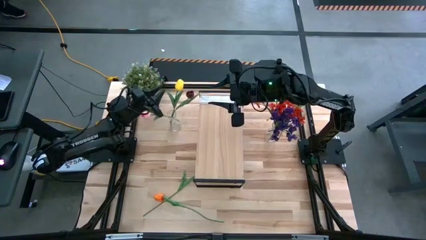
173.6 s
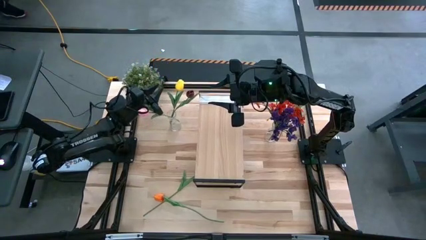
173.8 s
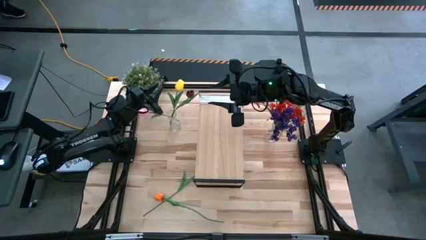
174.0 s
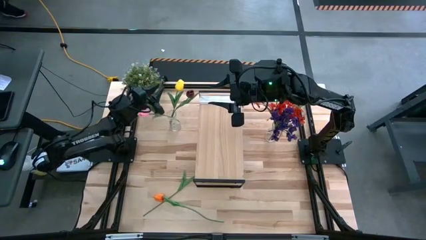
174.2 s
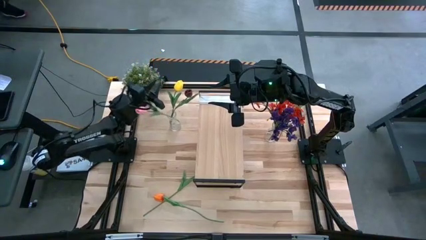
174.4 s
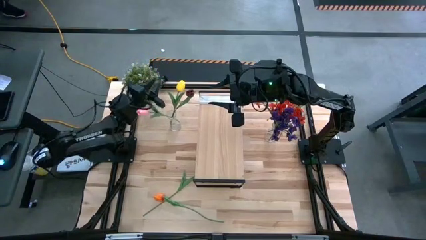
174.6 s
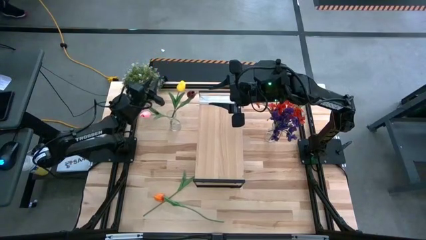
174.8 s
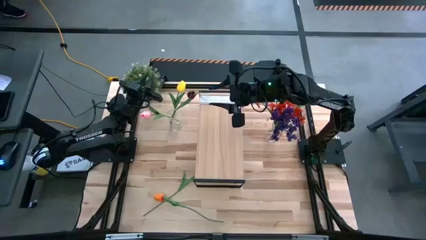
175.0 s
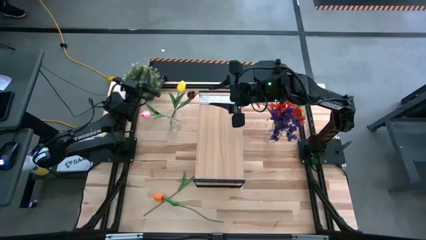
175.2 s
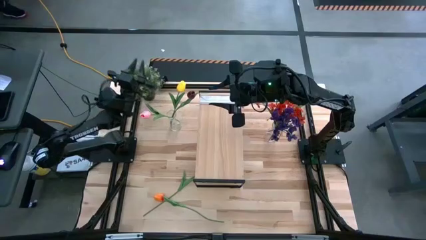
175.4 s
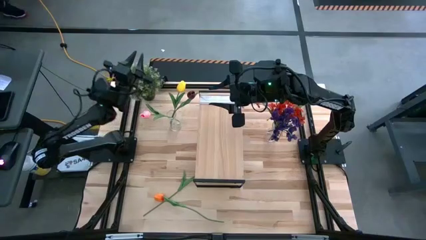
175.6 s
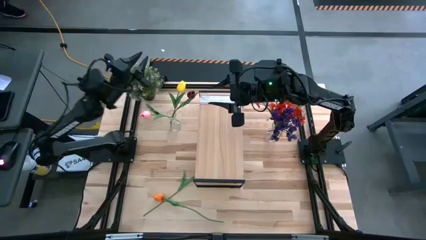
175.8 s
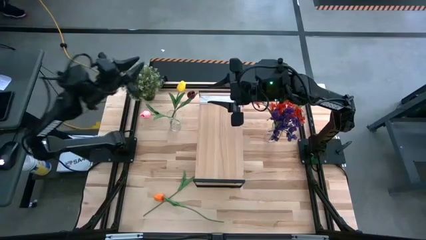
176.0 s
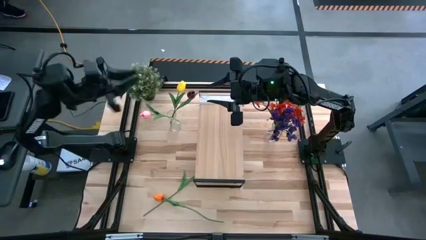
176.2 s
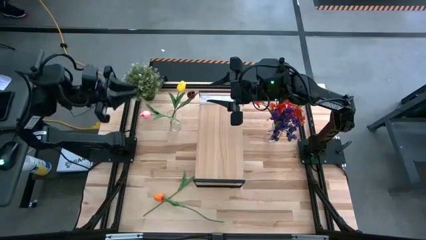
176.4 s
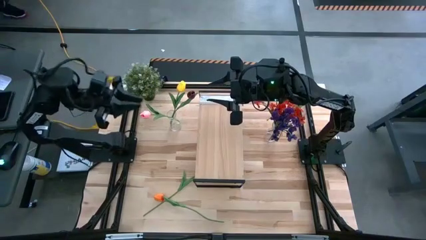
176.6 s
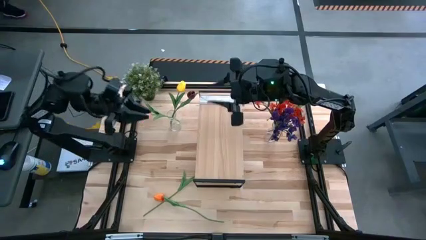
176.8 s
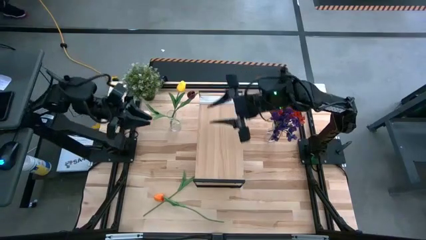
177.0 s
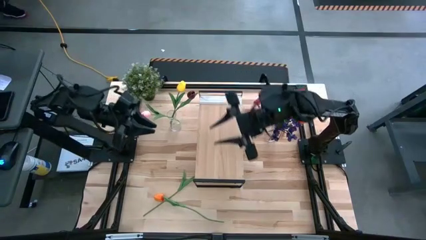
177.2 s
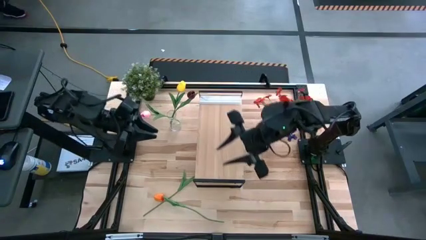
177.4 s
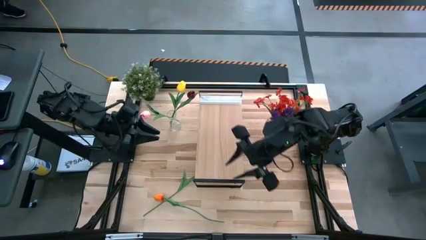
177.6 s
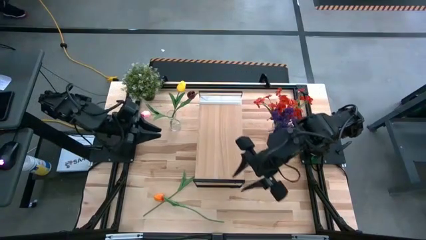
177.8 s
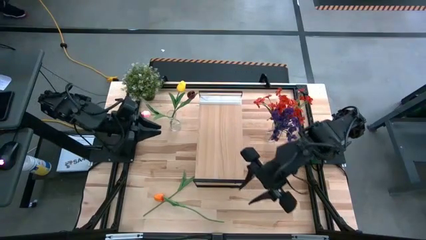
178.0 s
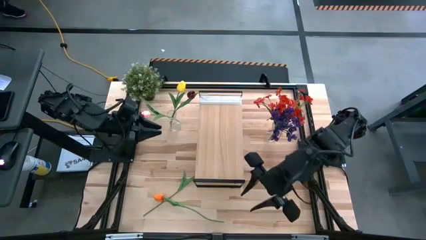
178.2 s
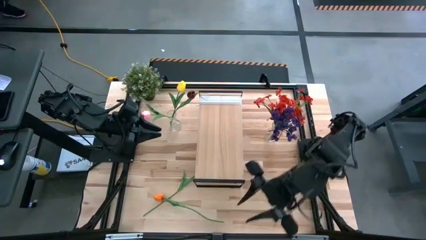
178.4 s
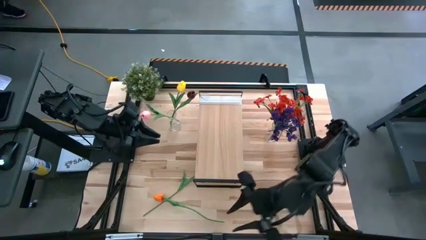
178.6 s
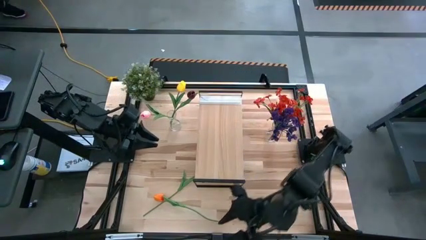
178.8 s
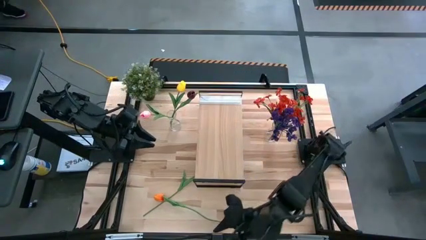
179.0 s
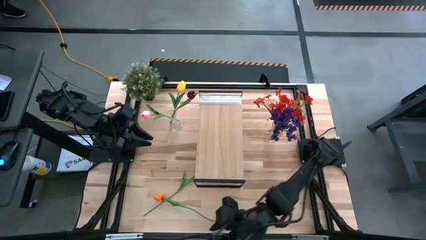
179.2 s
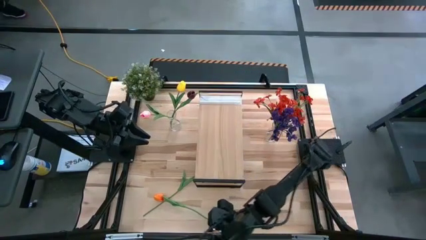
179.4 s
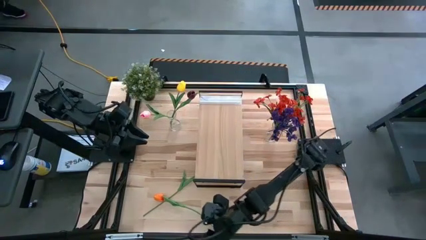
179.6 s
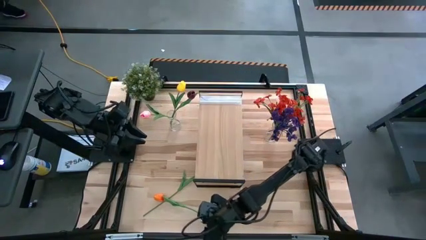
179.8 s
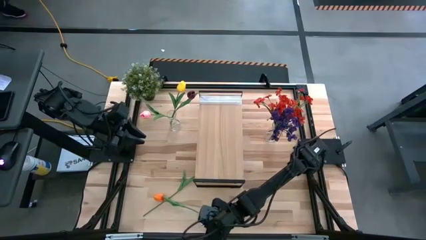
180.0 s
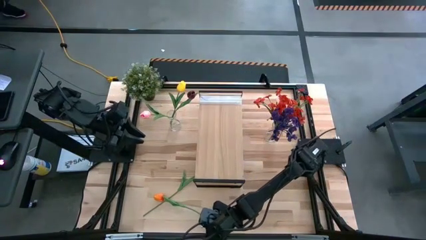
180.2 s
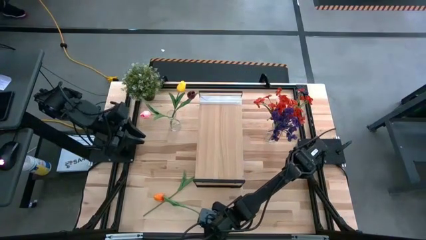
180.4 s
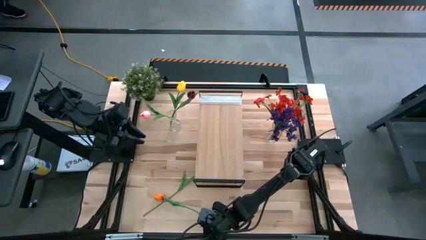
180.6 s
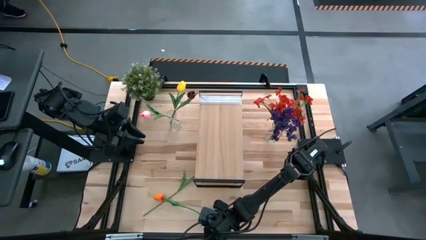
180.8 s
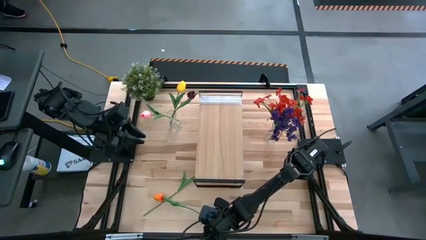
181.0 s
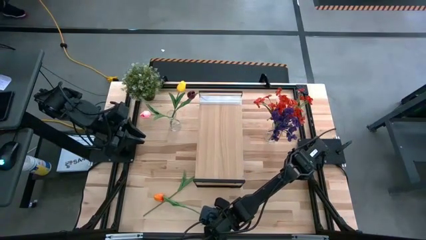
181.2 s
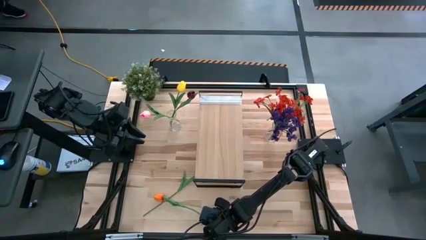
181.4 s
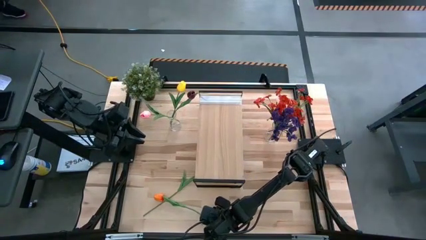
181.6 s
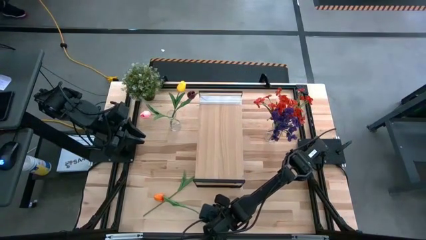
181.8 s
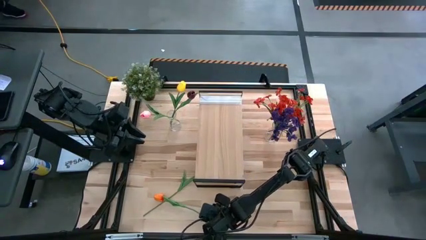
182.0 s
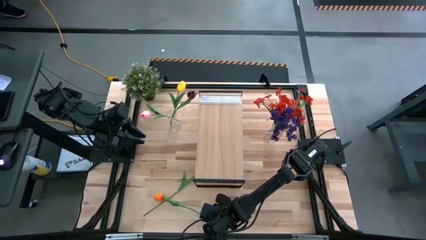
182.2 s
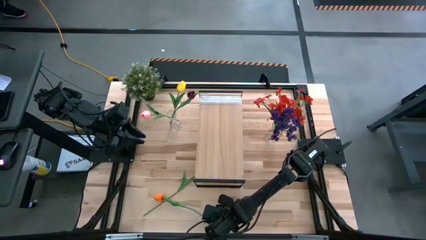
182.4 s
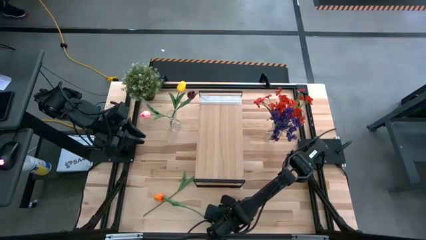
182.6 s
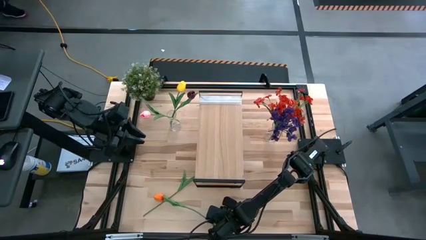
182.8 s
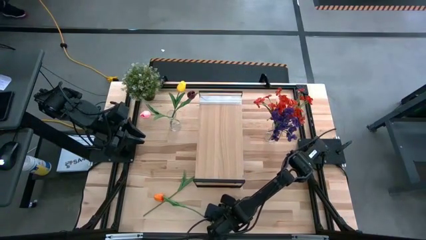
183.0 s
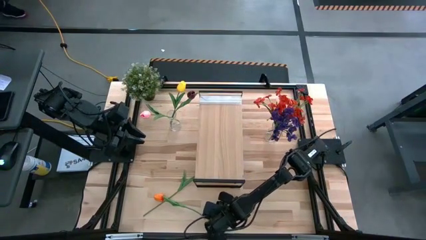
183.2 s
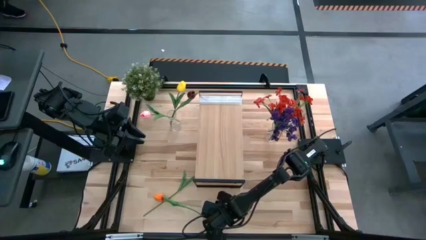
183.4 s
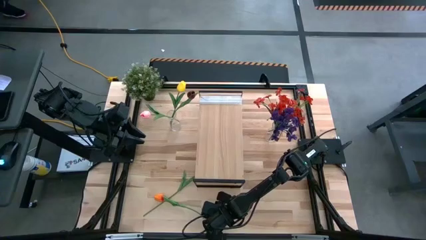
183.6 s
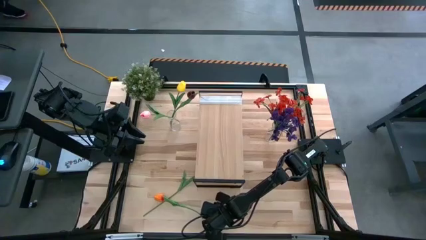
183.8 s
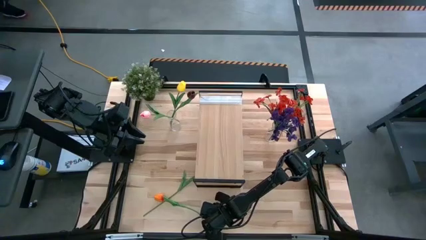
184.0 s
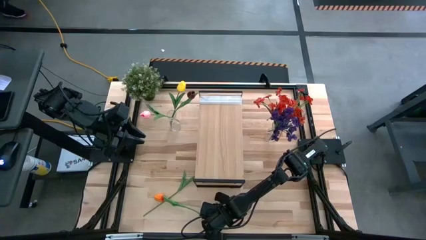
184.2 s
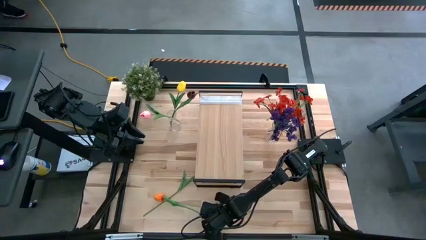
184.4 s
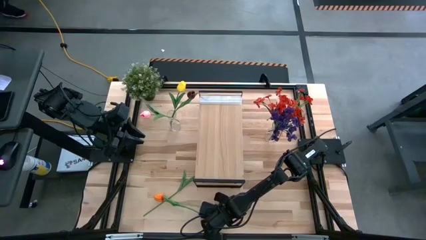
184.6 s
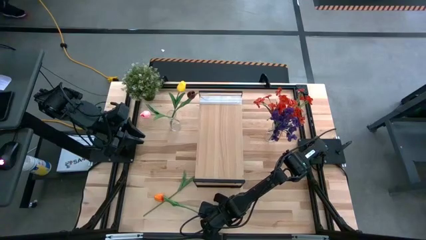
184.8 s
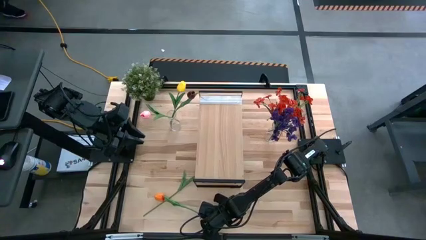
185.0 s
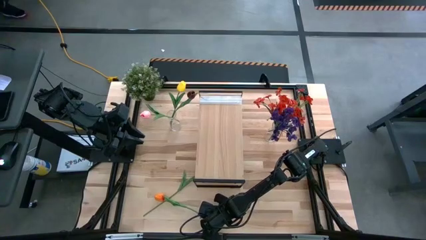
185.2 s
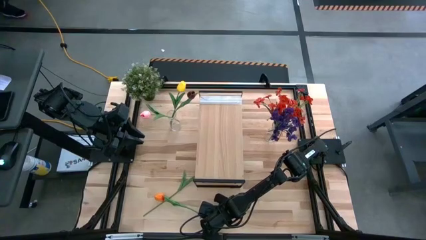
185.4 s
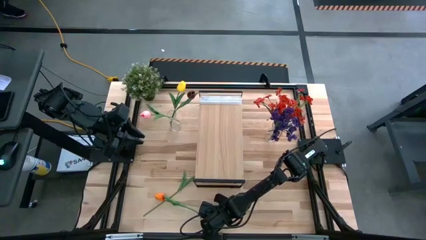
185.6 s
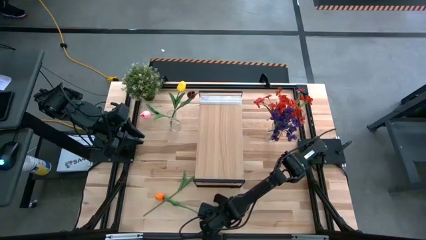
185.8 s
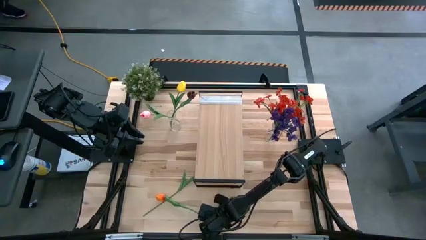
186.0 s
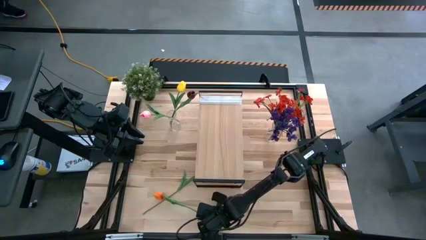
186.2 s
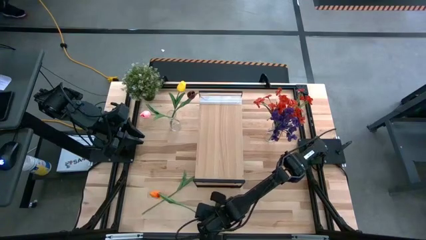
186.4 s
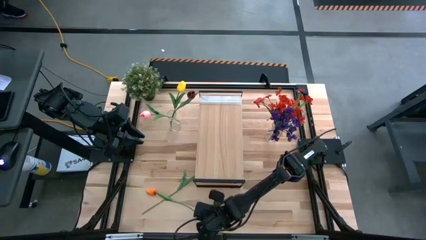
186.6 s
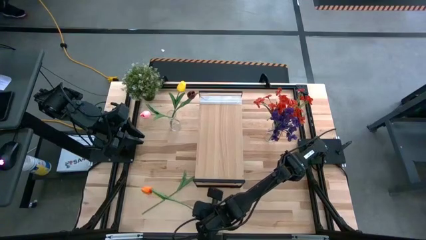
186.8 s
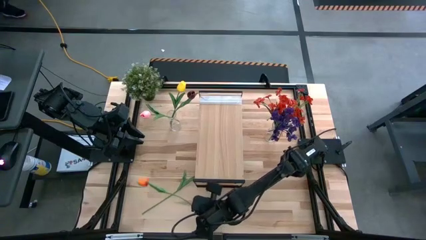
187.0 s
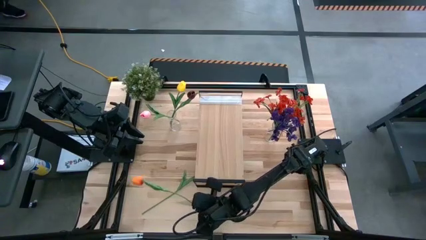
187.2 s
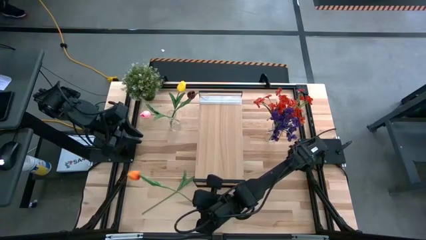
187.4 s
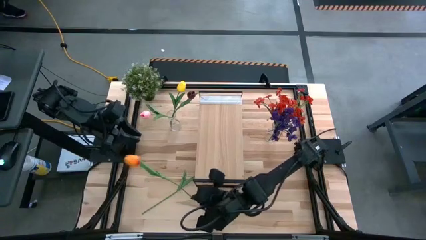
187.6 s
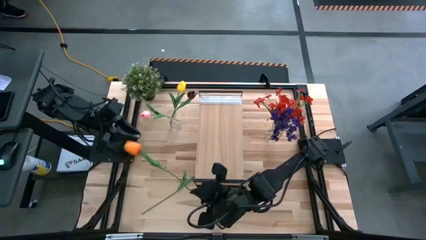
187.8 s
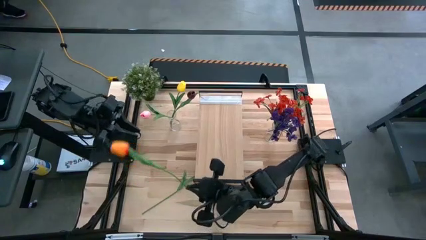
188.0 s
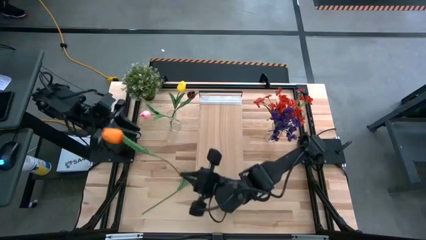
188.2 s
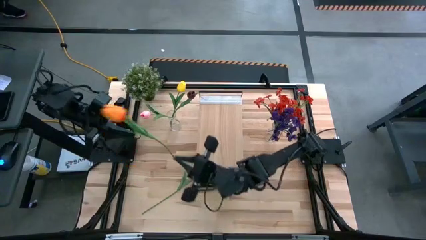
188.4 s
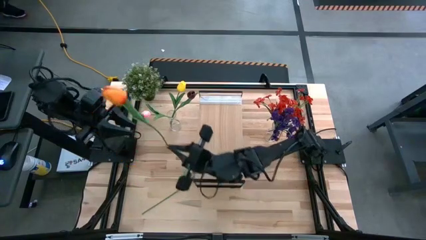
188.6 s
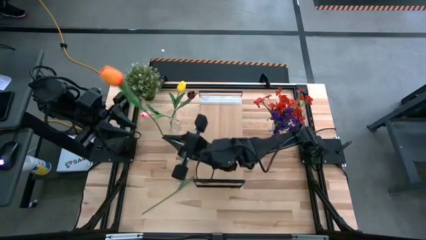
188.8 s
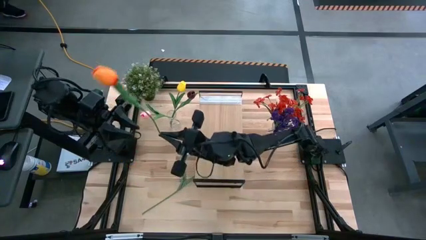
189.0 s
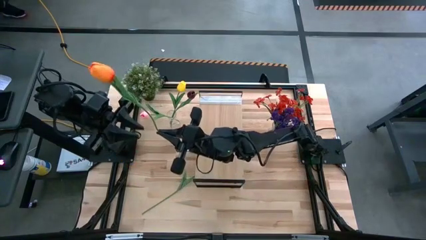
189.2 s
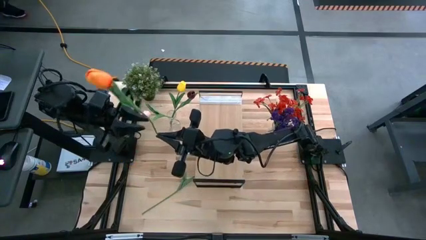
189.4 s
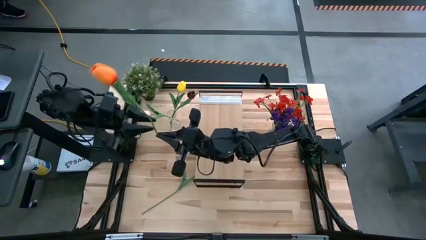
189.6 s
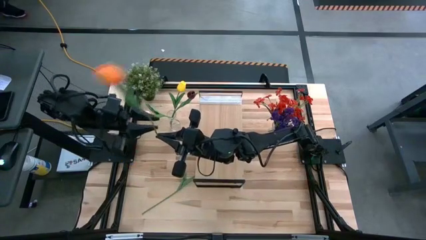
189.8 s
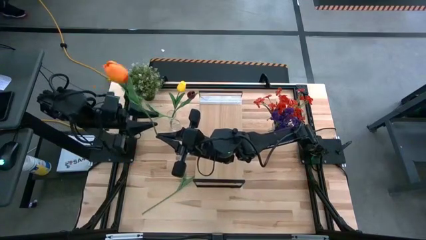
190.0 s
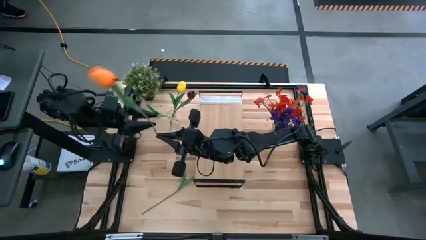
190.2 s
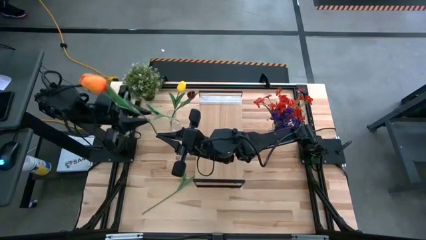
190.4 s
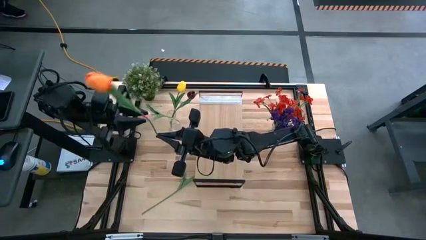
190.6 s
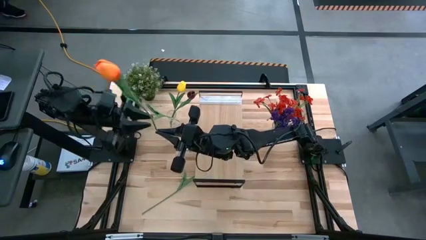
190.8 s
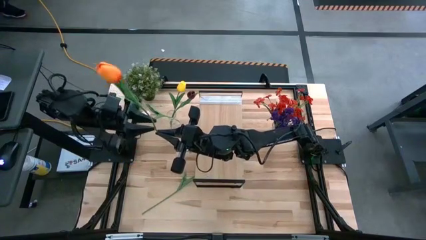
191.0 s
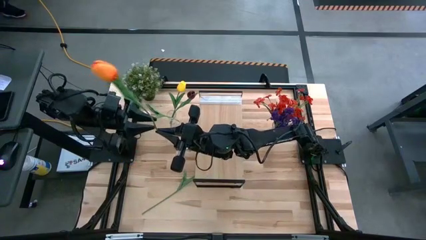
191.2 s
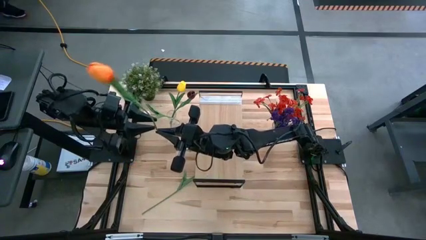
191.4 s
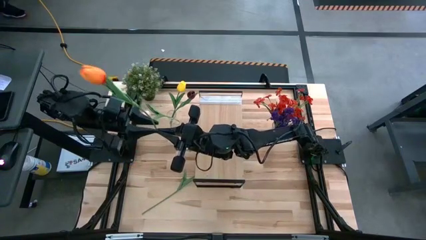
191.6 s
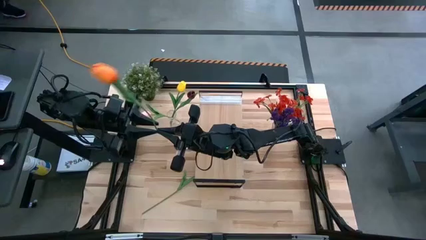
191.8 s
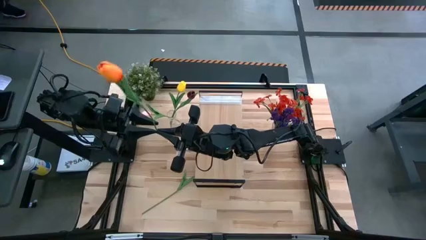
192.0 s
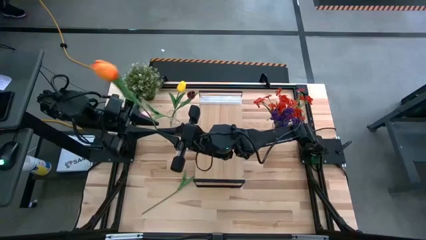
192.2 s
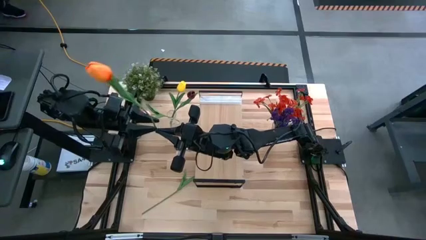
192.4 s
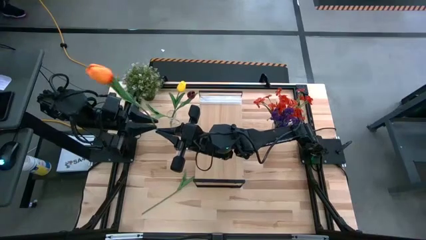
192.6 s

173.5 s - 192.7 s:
Task: Pick and place flowers into a vace then onto a shelf
Put the orange tulip into the left transparent vase
